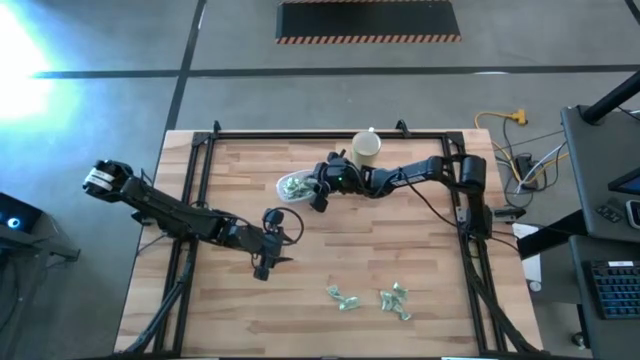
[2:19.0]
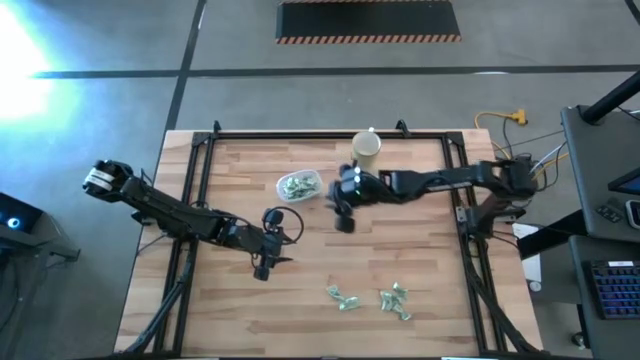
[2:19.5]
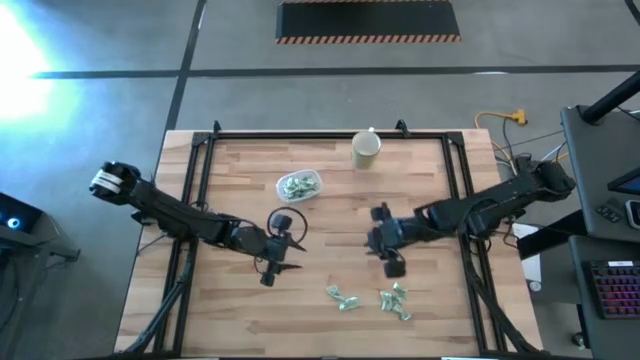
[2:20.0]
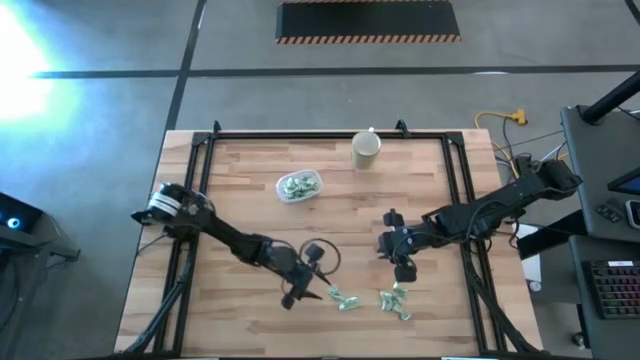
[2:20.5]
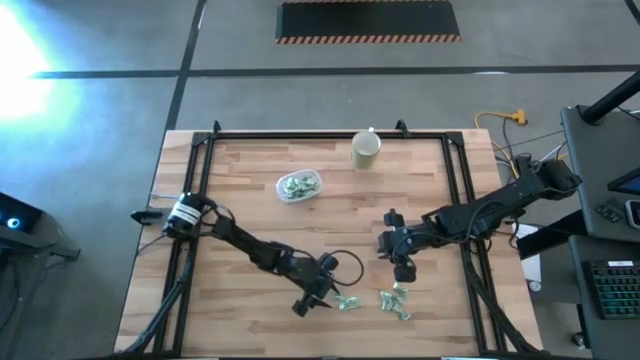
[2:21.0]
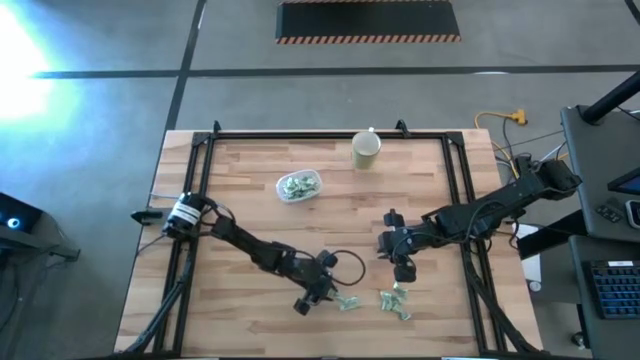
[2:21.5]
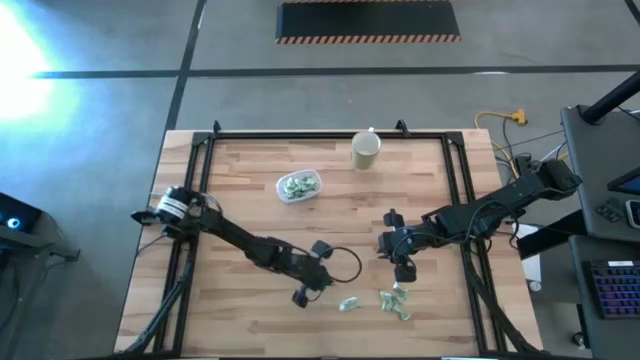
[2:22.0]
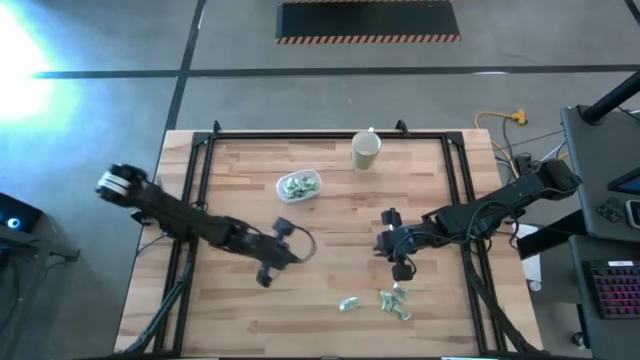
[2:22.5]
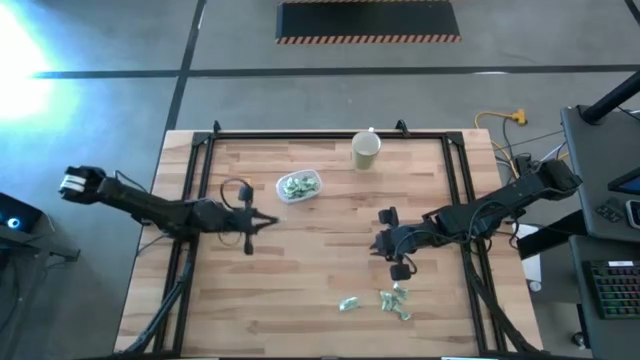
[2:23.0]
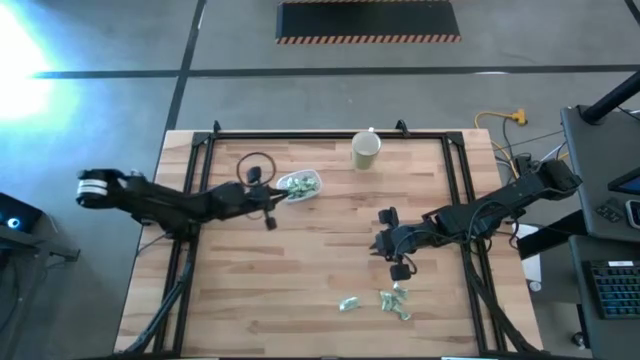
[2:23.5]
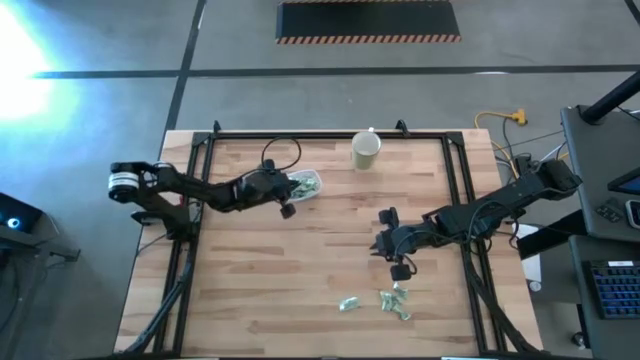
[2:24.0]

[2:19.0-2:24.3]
Task: Pick and place Stevia / Truvia into bins
Put the stevia packet into the transparent container

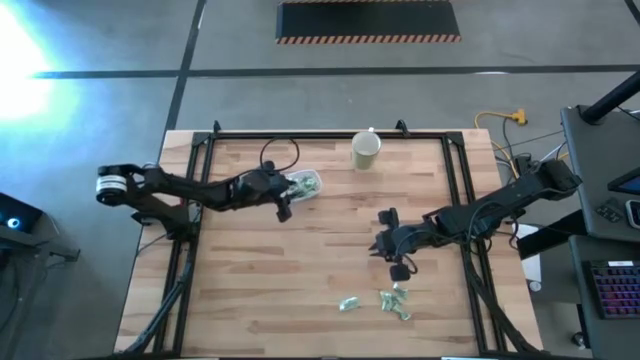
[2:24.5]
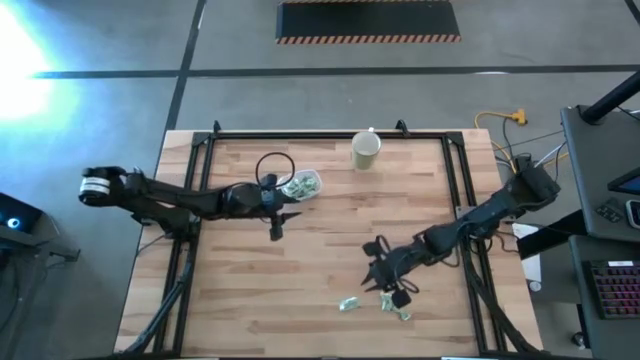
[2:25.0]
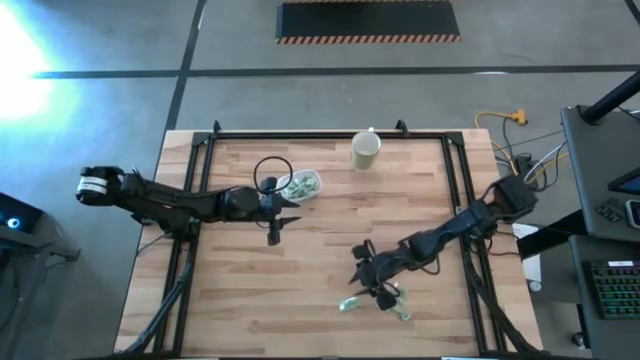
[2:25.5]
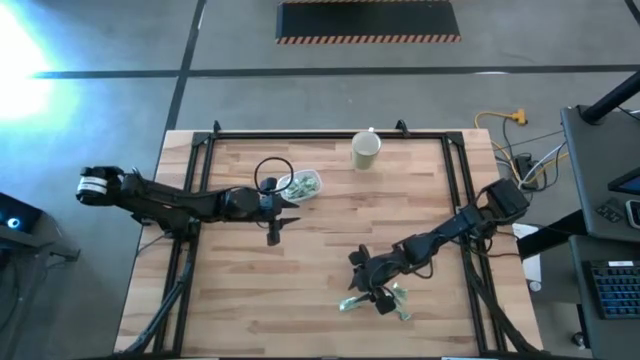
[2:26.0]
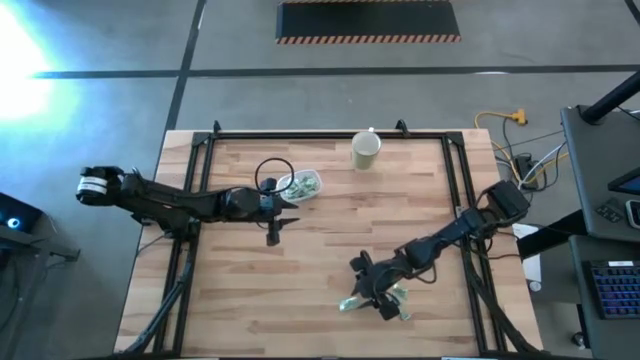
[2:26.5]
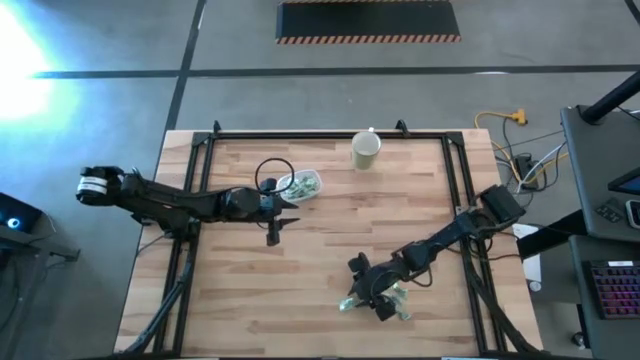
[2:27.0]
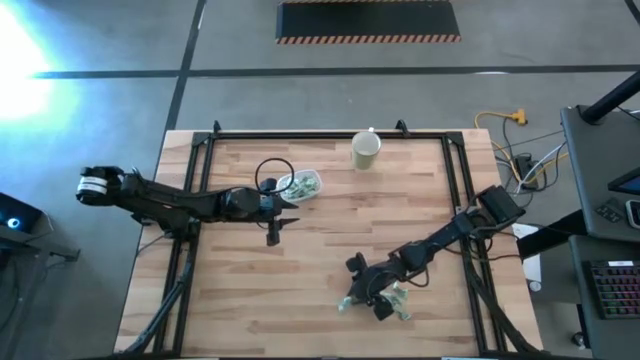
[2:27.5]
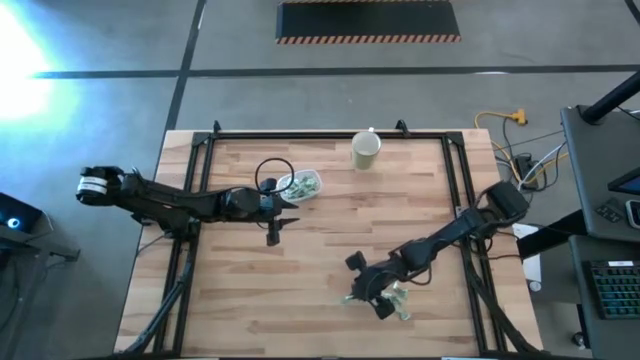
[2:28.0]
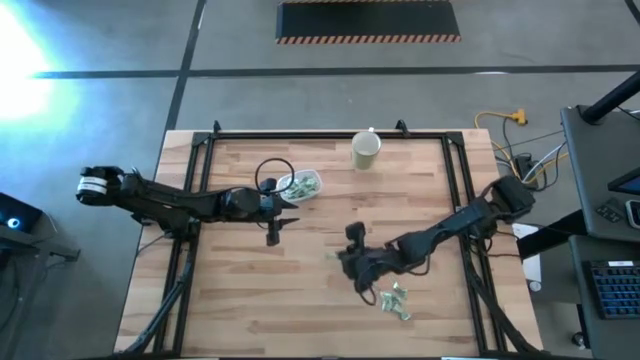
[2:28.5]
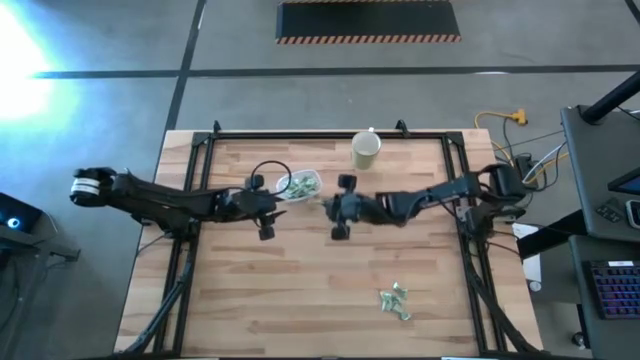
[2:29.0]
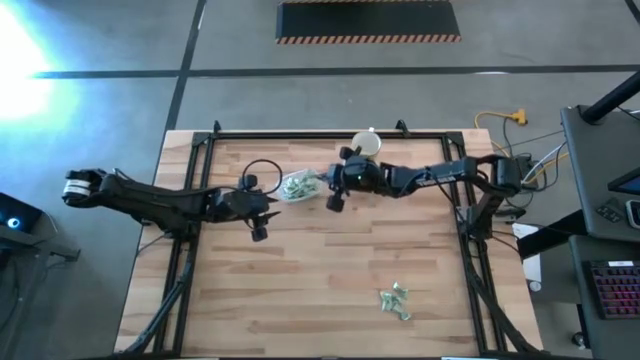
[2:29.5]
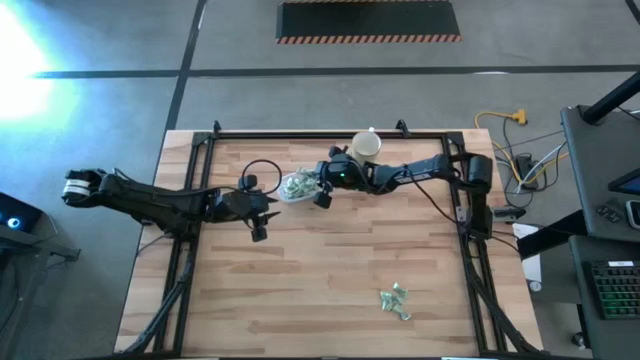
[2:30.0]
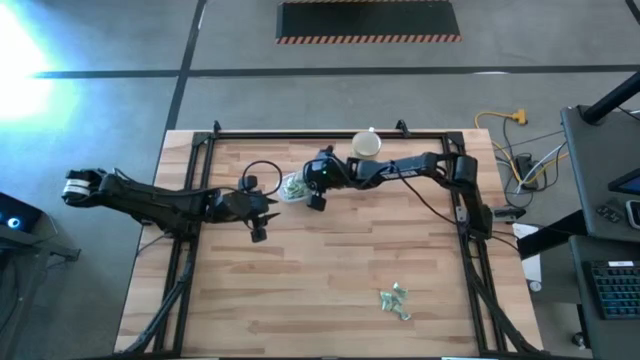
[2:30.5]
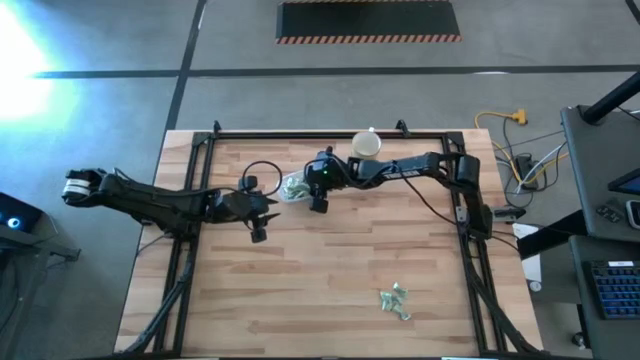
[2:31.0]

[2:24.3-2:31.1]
Put the stevia packet into the transparent container

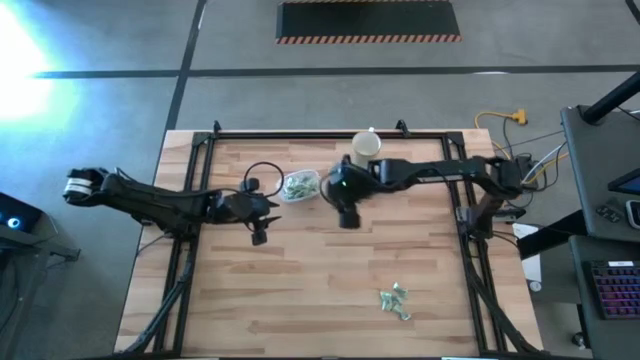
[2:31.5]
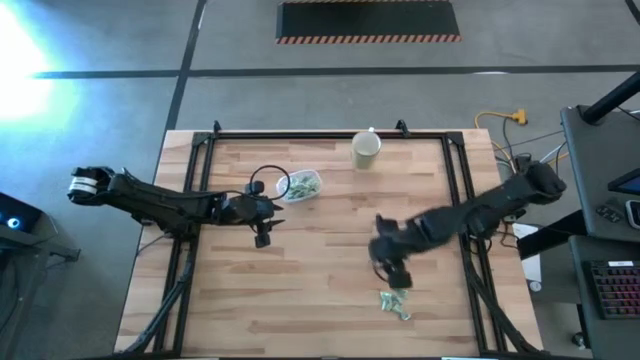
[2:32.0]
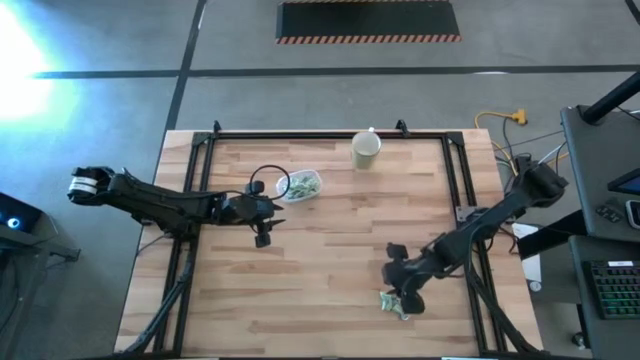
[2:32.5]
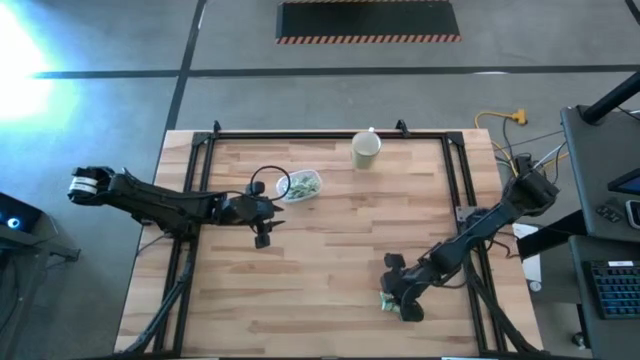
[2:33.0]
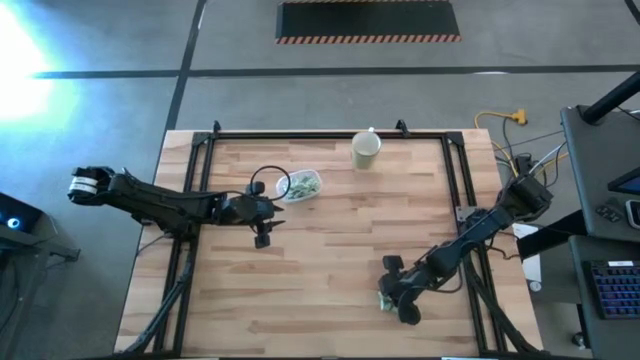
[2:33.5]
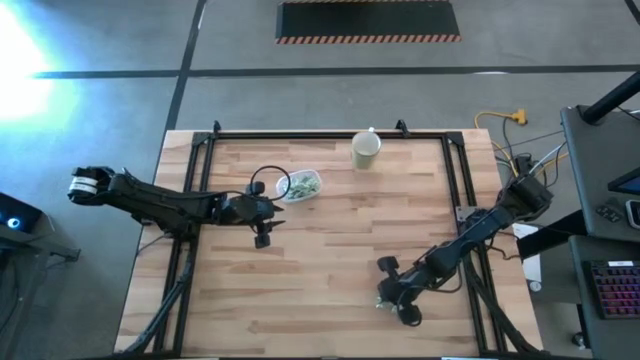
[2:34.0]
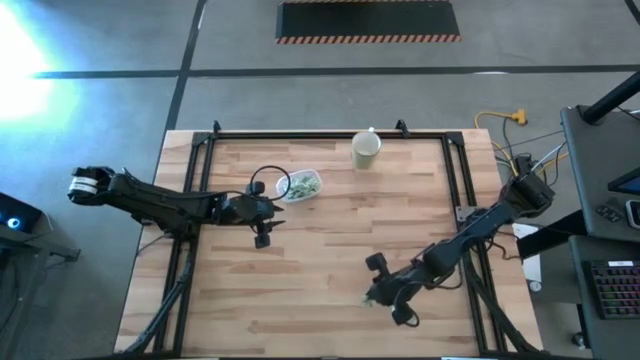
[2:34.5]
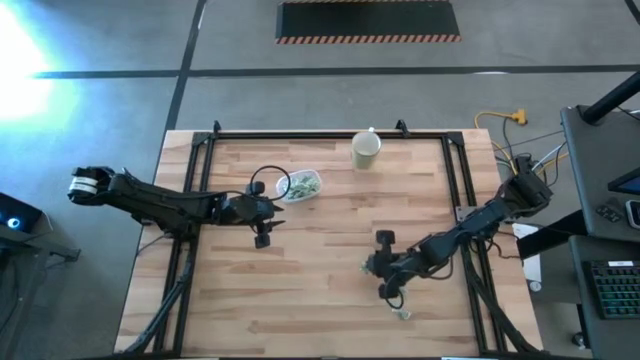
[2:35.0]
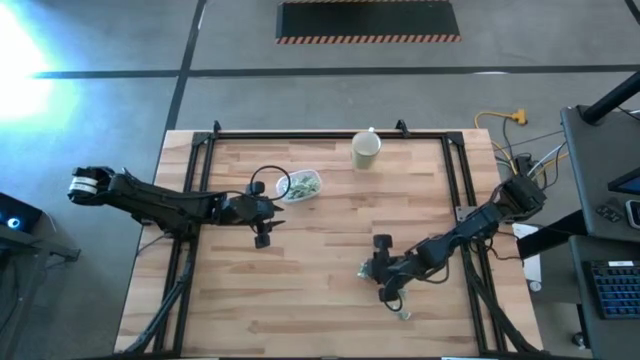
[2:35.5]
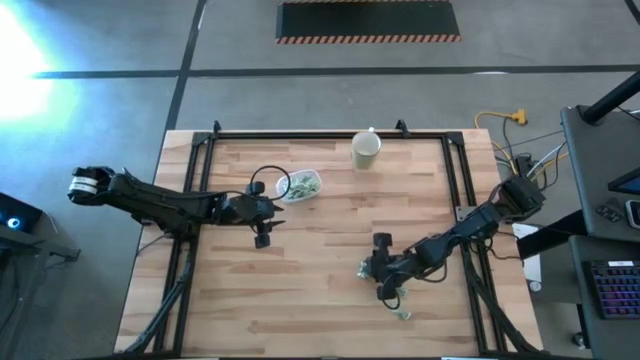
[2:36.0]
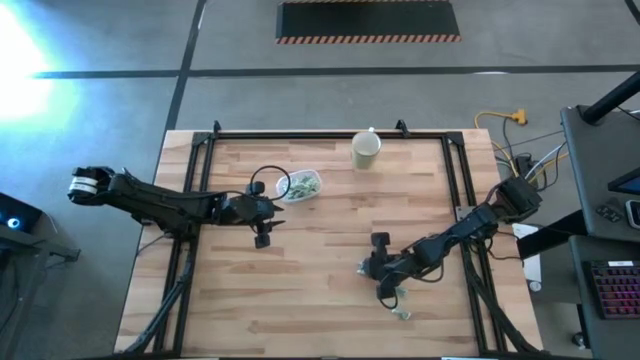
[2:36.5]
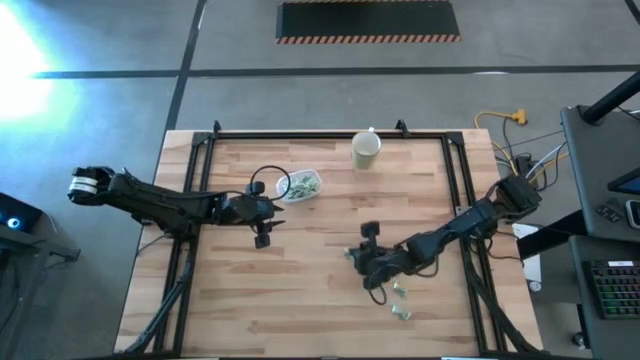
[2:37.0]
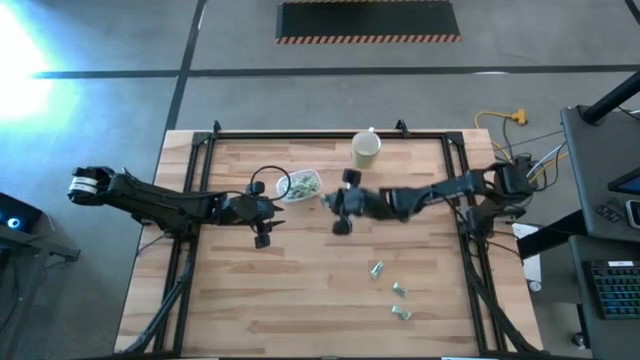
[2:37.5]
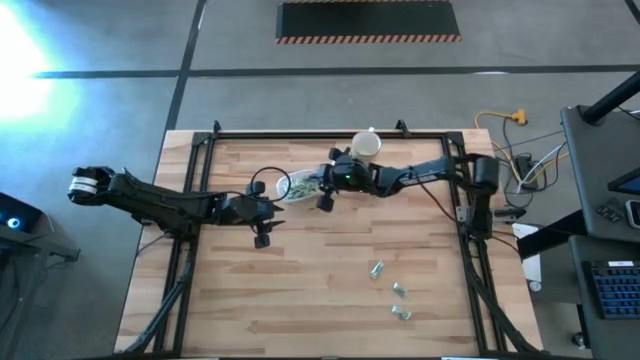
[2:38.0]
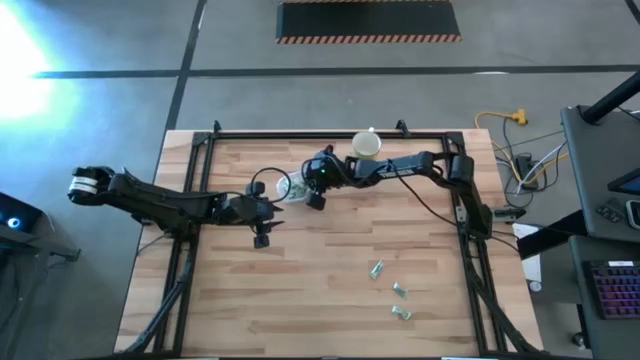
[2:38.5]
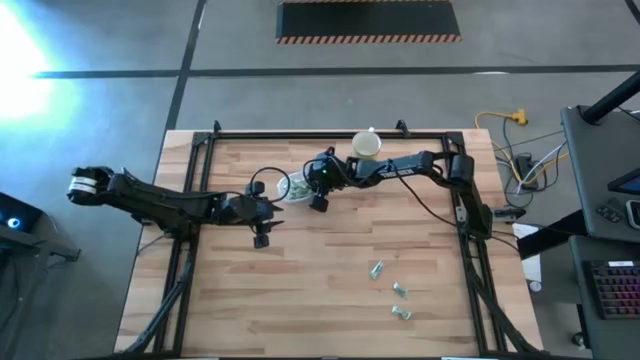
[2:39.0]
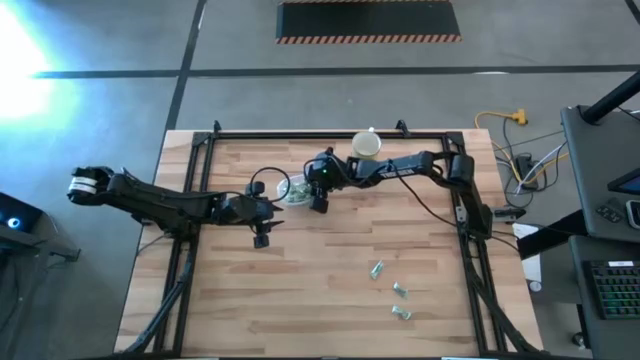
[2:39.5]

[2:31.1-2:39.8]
Put the stevia packet into the transparent container

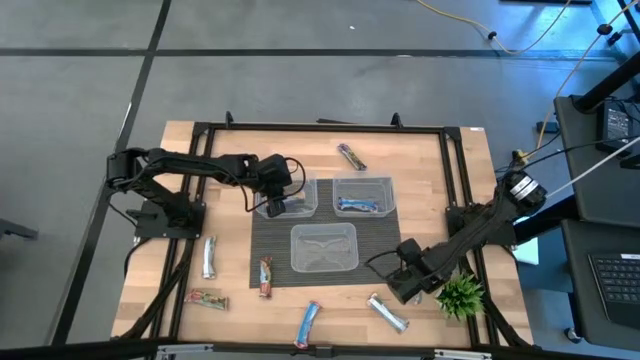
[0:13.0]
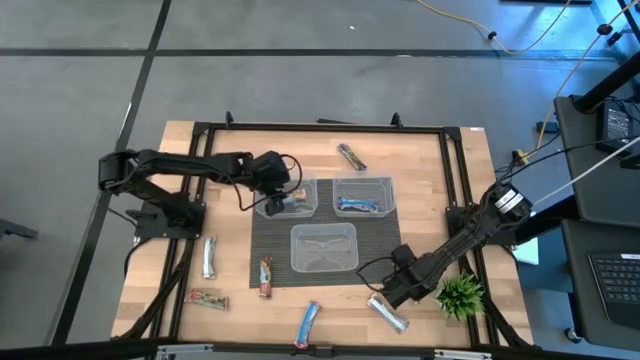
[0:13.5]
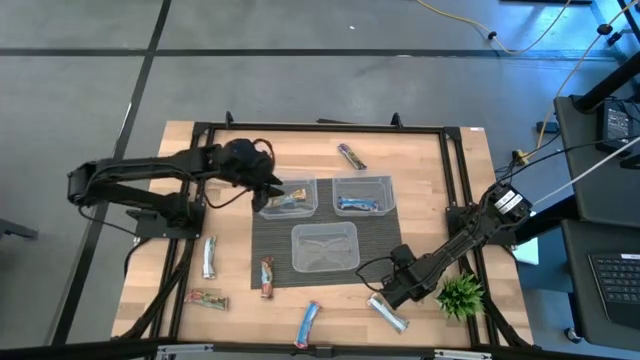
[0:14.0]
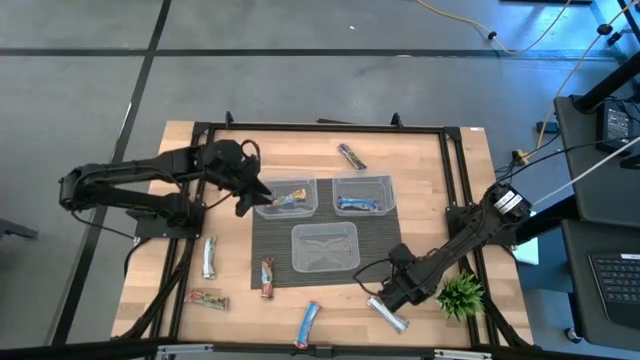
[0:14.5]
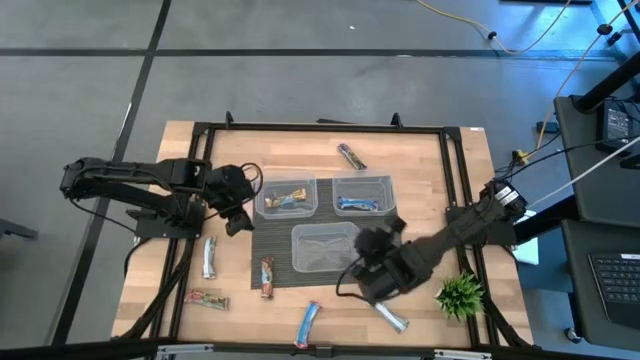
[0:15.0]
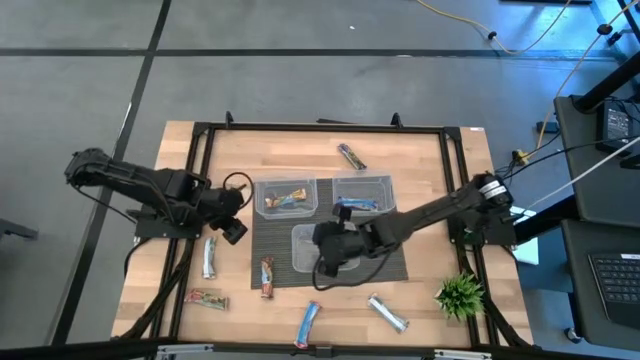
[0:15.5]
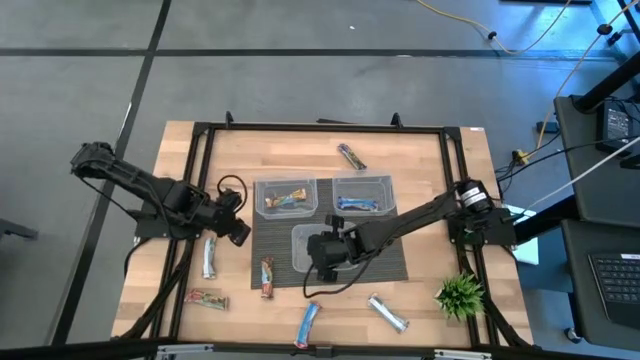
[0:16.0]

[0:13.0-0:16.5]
Task: Pick and place Granola Bars by type
Put the red granola bar into the bottom transparent bin
